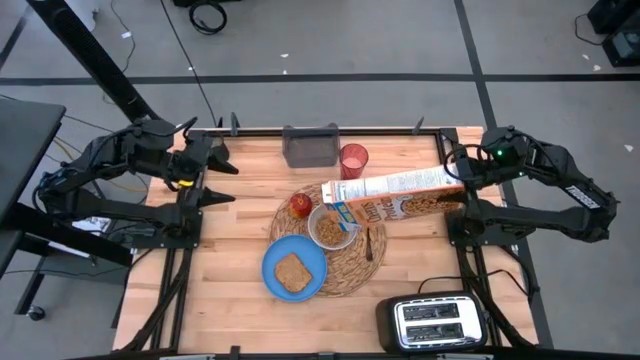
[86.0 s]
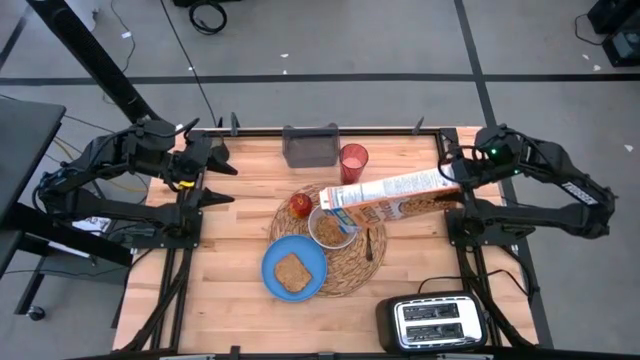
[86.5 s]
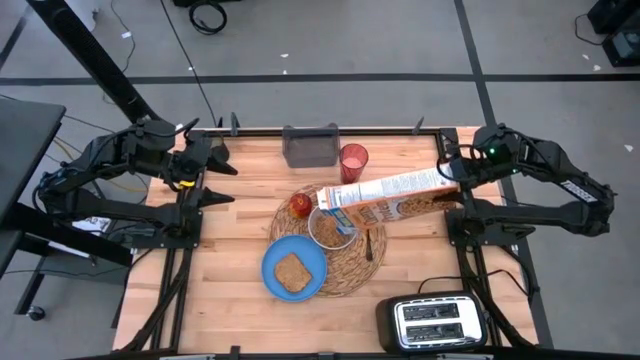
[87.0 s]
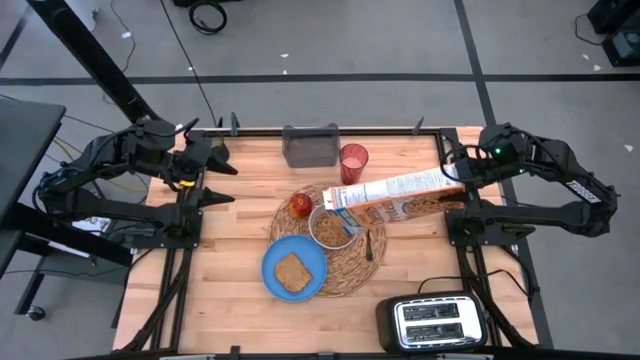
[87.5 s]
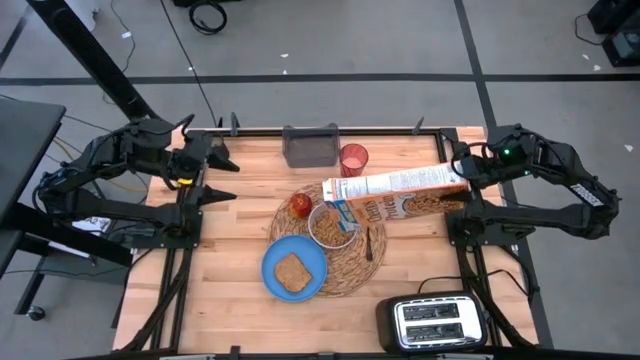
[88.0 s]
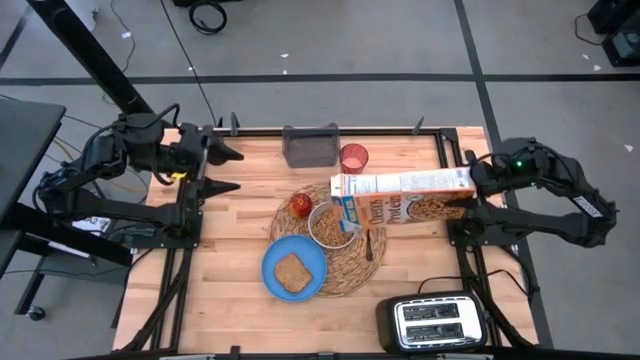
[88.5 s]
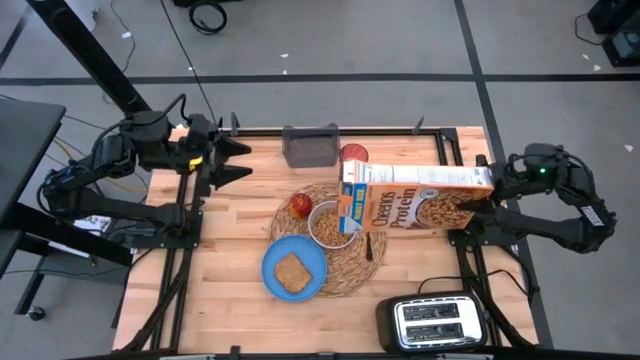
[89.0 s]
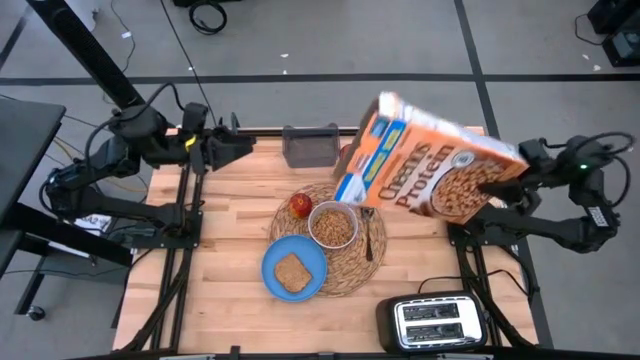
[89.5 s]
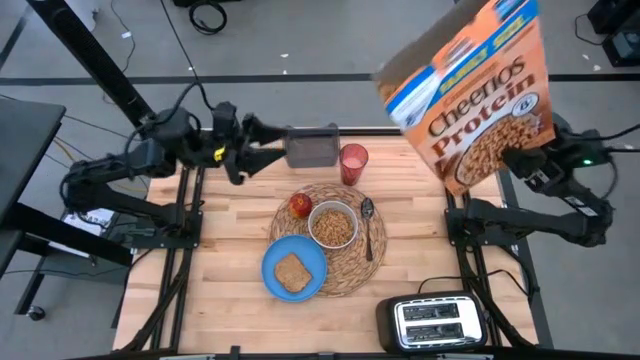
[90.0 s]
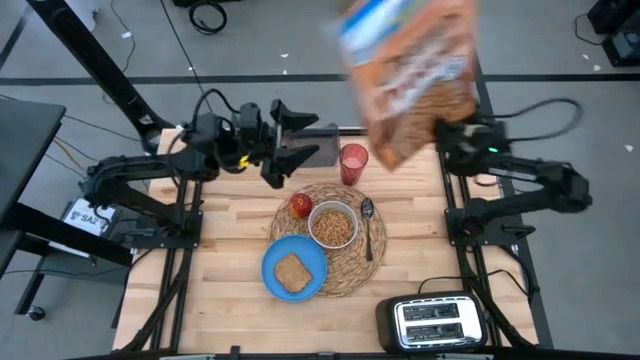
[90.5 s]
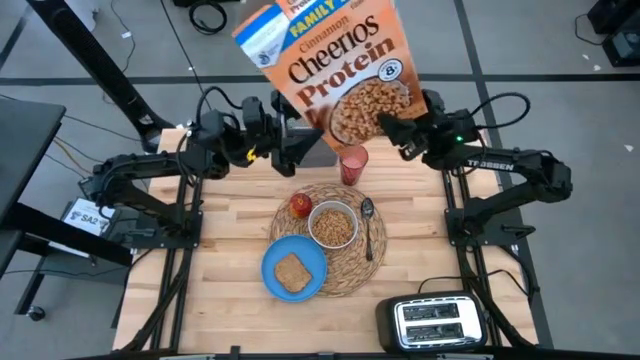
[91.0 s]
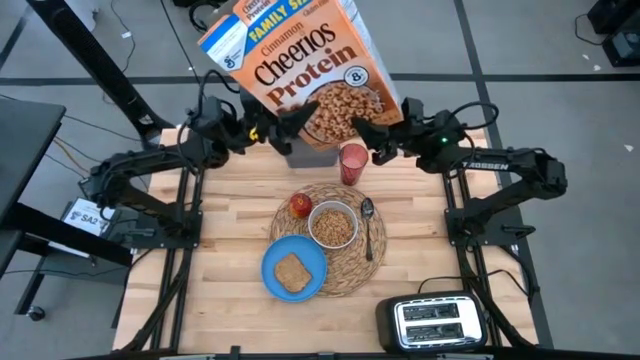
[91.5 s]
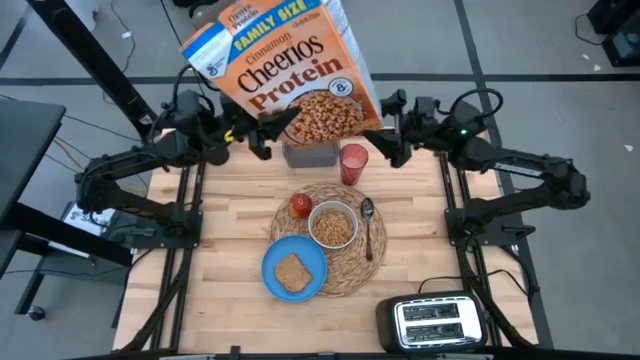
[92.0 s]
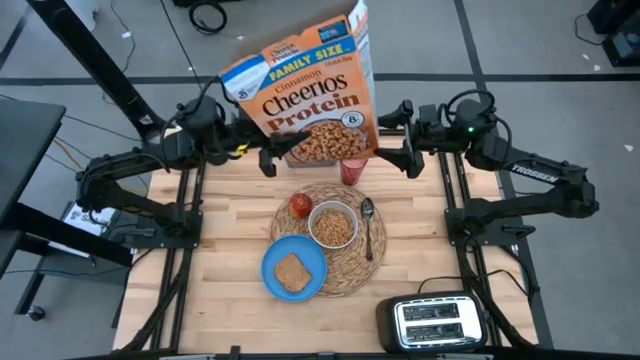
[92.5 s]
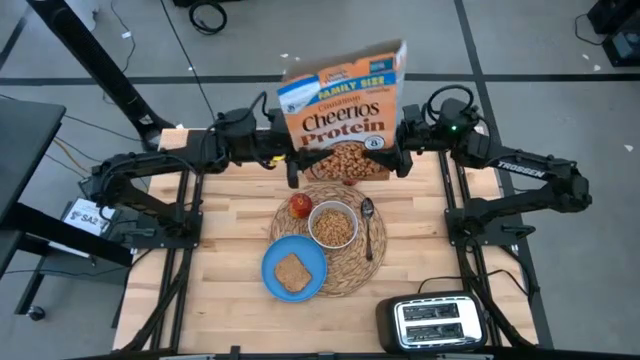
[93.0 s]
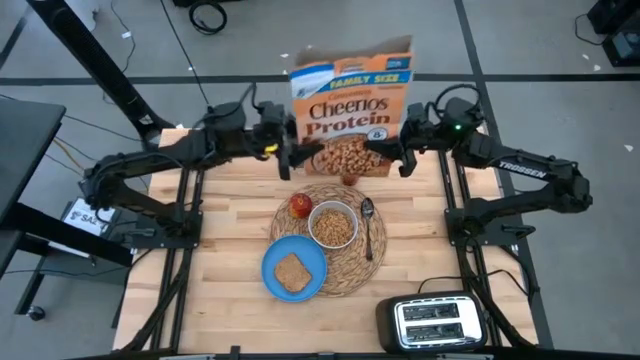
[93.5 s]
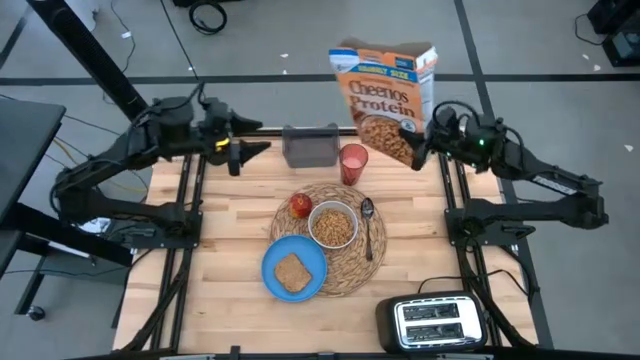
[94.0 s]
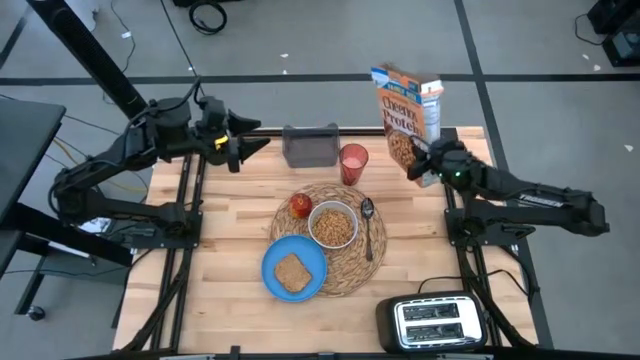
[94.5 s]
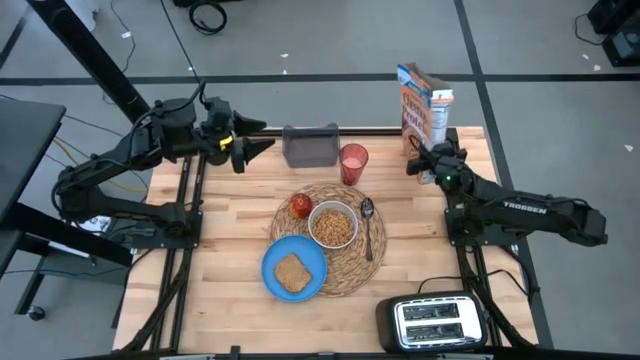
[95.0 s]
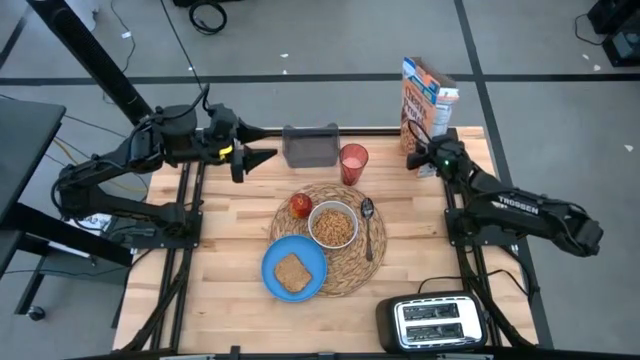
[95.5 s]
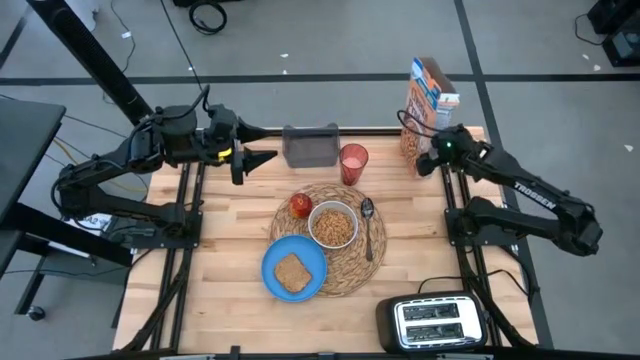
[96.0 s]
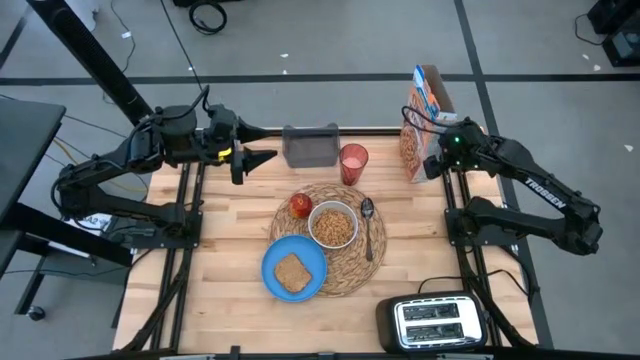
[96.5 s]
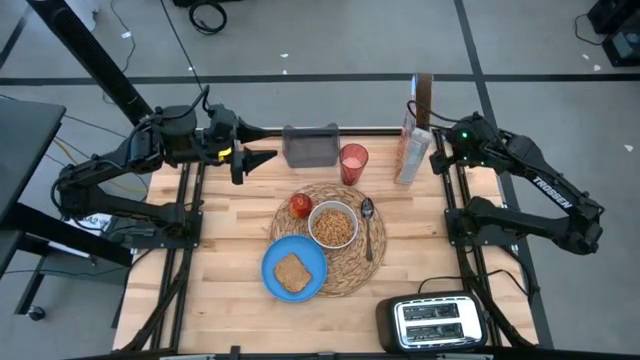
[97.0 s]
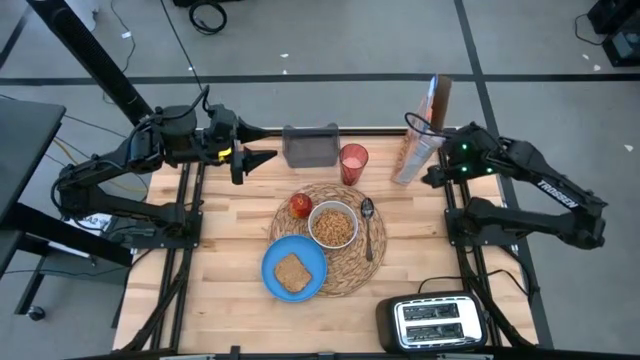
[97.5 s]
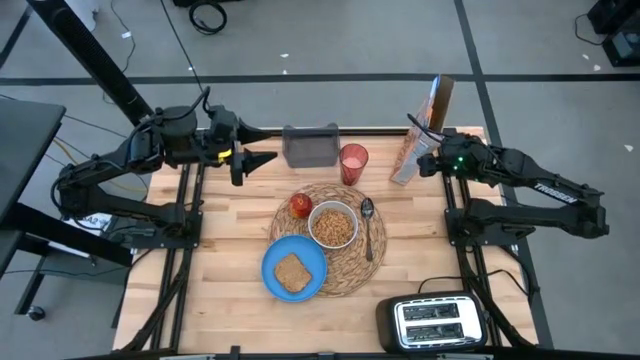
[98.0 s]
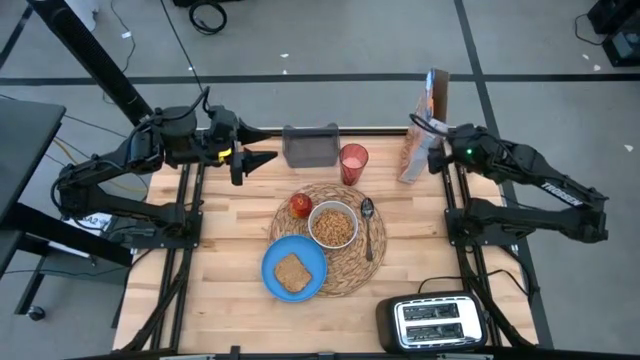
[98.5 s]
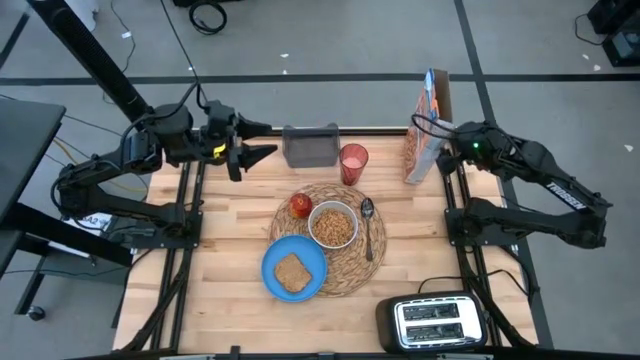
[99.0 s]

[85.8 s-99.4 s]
Task: Arrange a breakfast setting
Pour the cereals from the cereal box into the white bowl

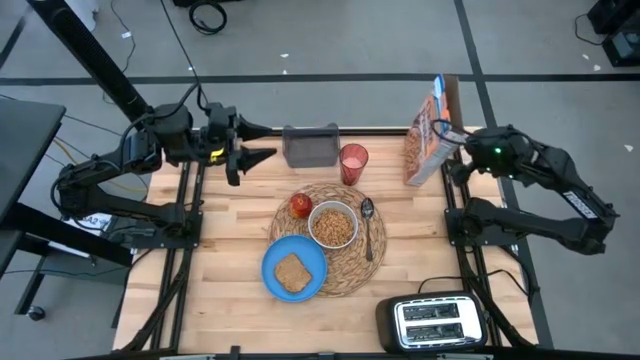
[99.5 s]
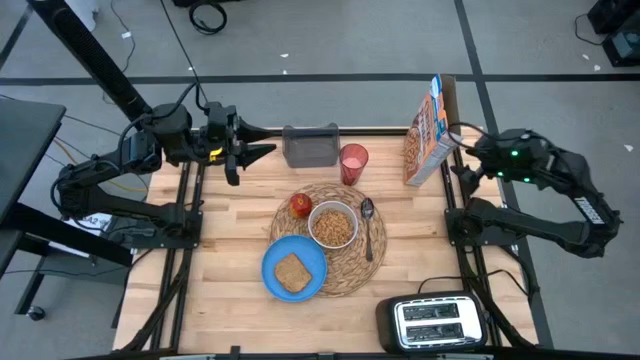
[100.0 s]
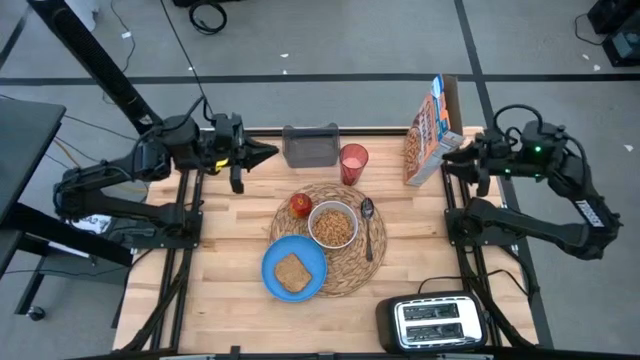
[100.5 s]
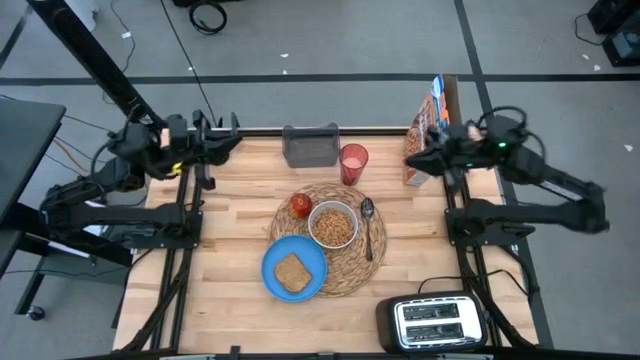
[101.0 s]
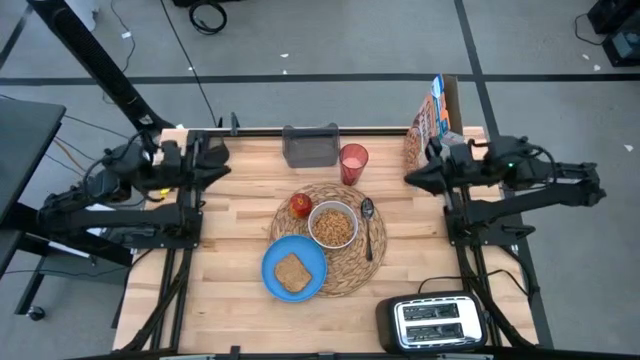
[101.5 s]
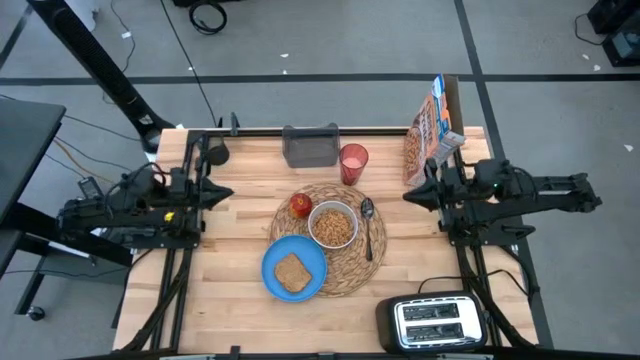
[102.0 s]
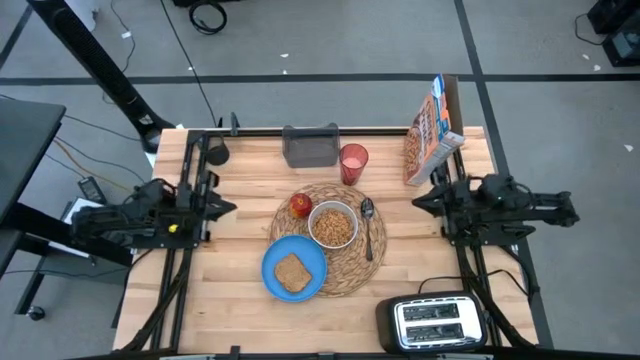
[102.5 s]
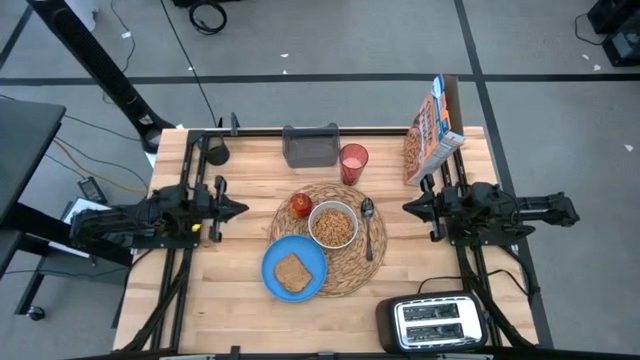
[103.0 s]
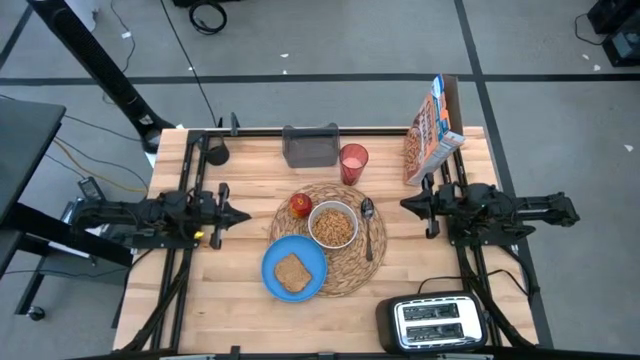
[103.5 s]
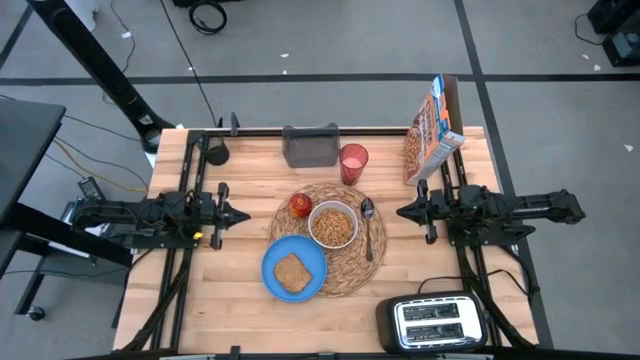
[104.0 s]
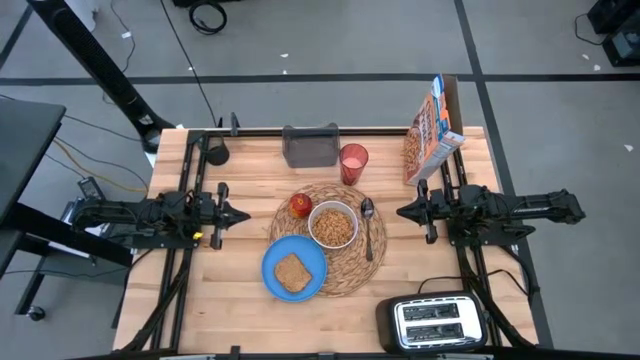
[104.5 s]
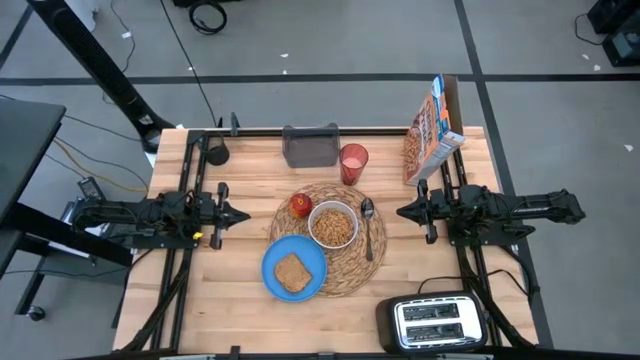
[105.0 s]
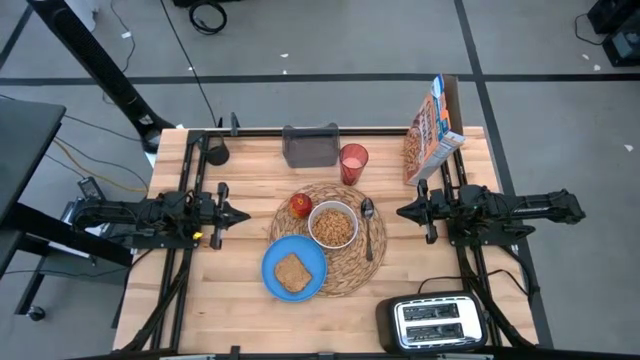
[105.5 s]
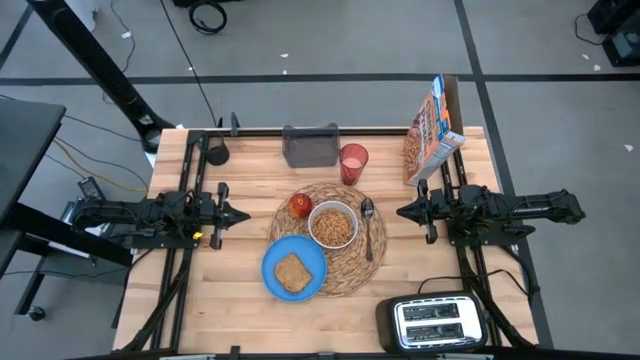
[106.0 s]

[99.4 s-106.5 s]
Return to Home Position
